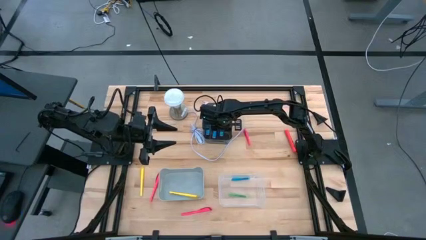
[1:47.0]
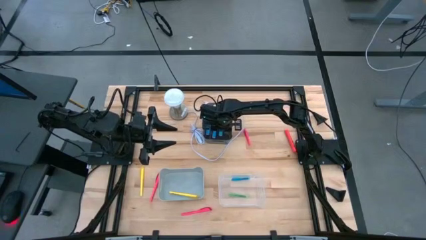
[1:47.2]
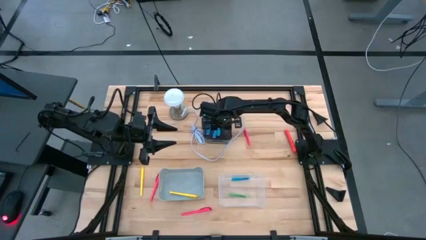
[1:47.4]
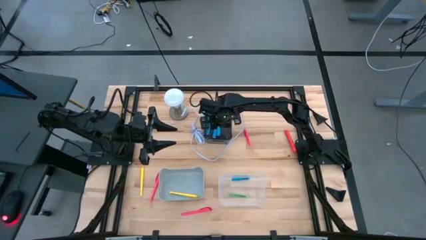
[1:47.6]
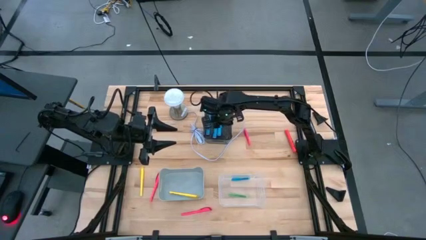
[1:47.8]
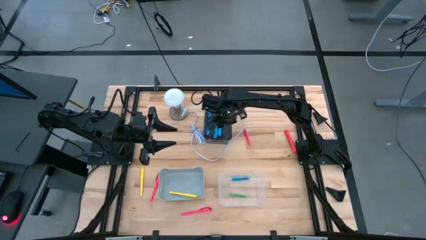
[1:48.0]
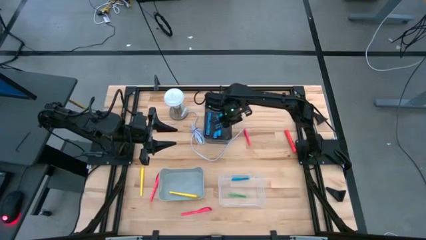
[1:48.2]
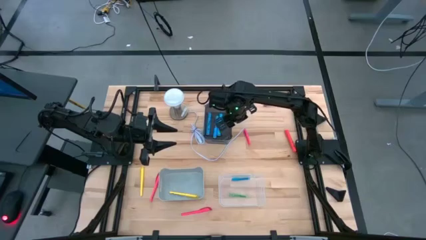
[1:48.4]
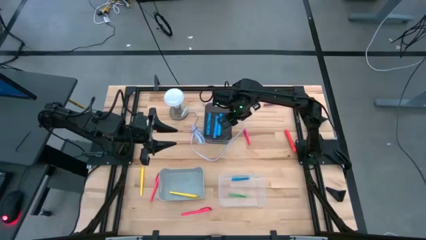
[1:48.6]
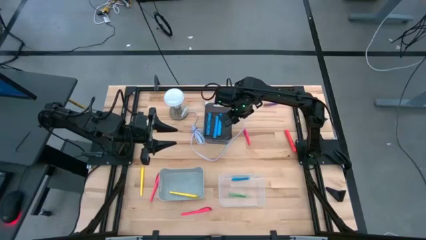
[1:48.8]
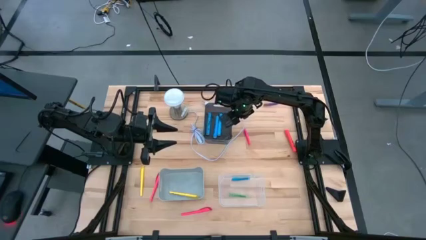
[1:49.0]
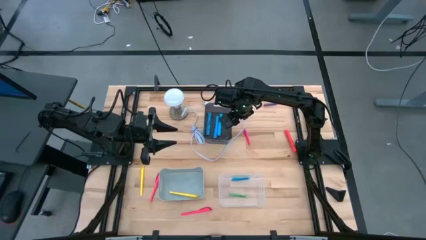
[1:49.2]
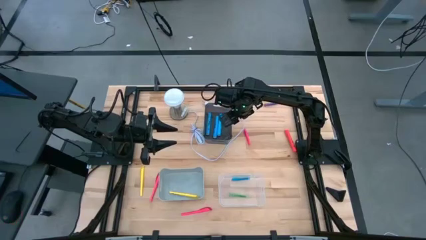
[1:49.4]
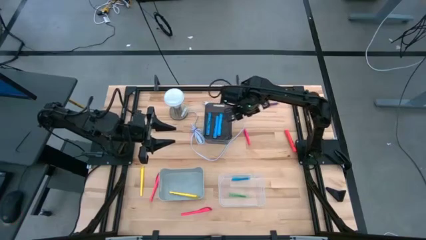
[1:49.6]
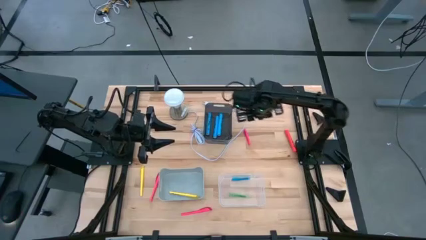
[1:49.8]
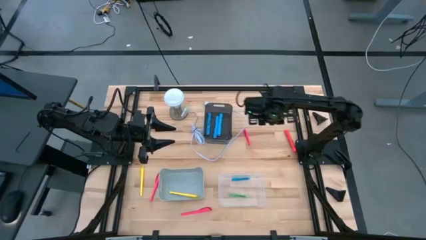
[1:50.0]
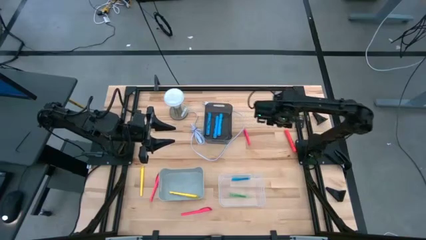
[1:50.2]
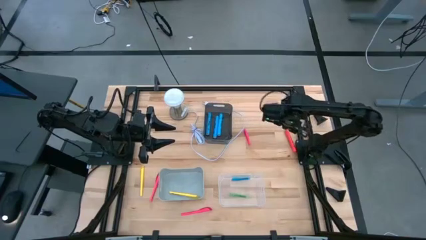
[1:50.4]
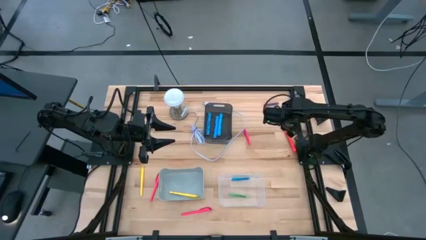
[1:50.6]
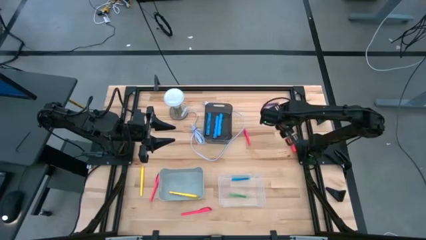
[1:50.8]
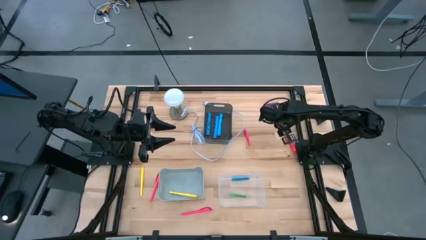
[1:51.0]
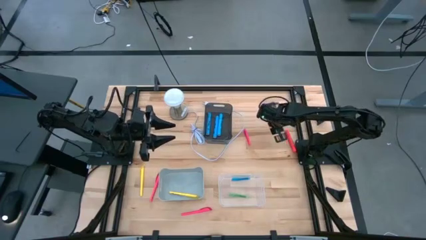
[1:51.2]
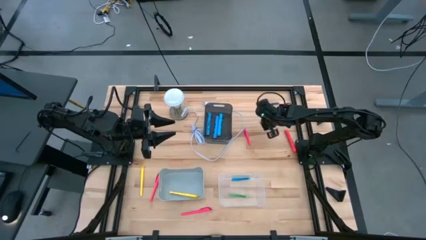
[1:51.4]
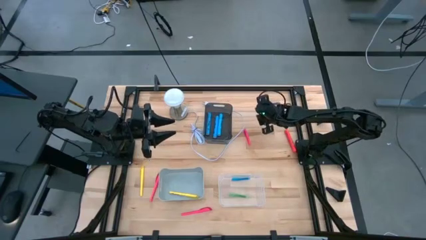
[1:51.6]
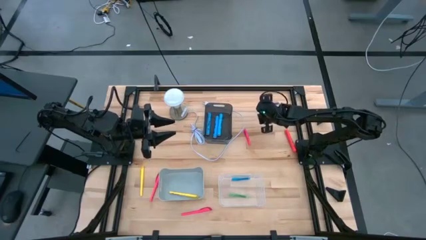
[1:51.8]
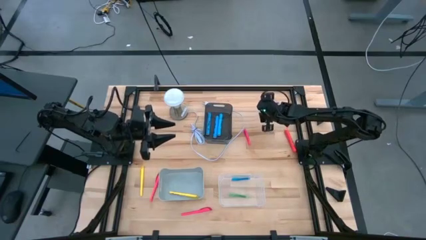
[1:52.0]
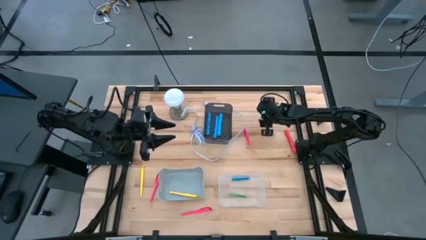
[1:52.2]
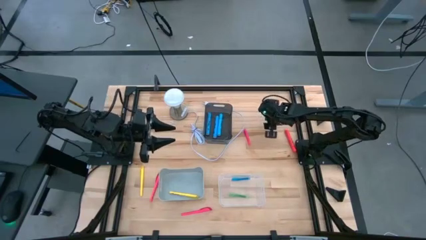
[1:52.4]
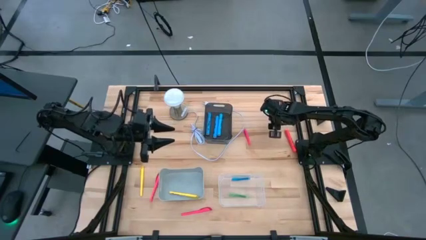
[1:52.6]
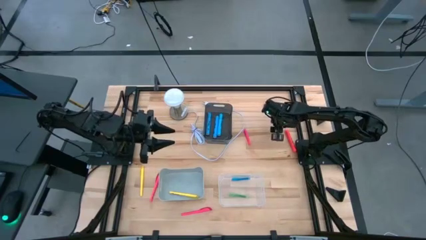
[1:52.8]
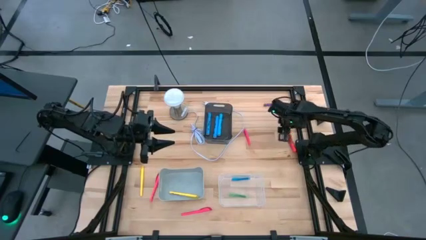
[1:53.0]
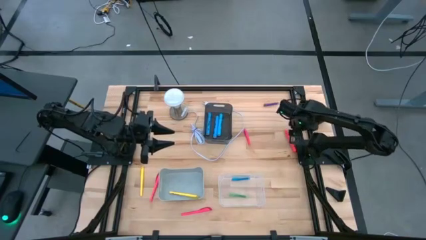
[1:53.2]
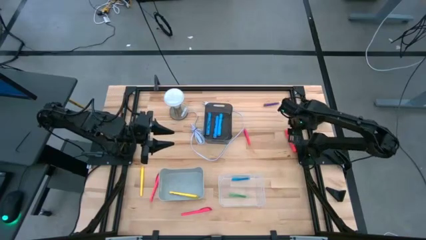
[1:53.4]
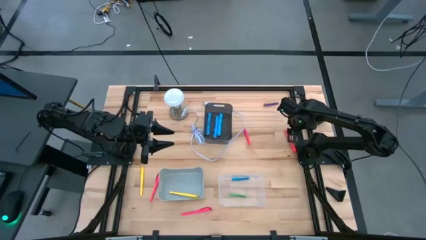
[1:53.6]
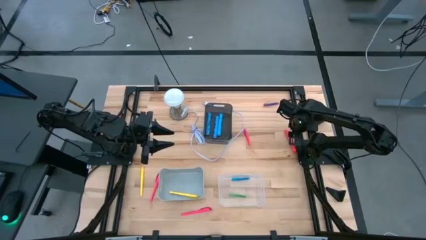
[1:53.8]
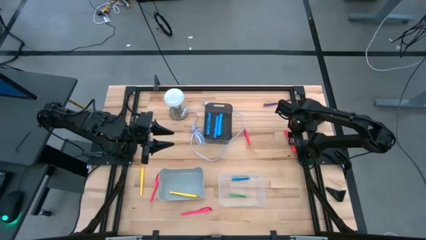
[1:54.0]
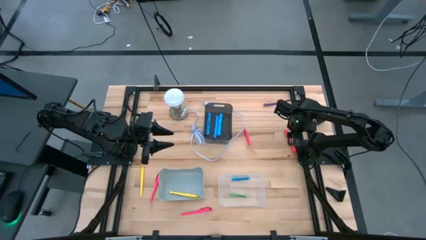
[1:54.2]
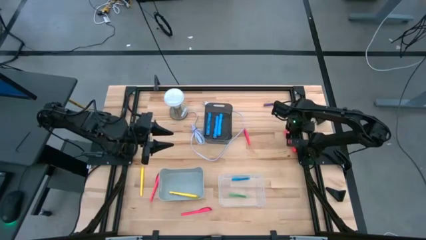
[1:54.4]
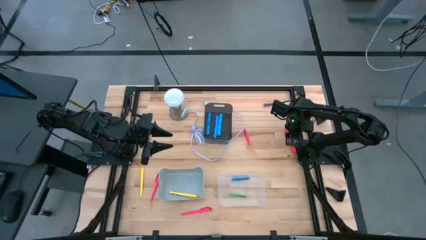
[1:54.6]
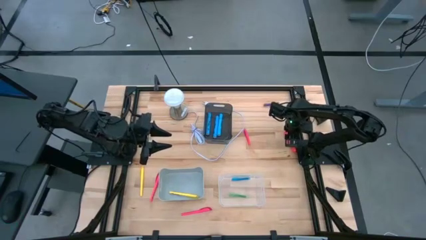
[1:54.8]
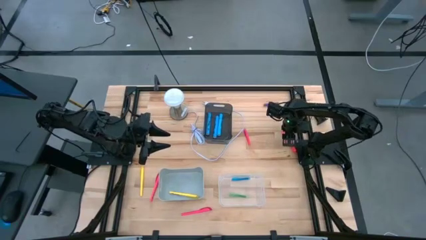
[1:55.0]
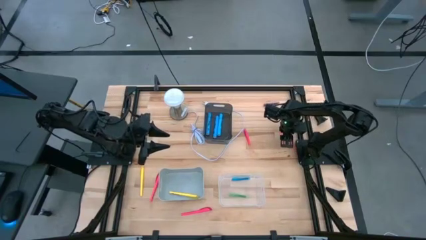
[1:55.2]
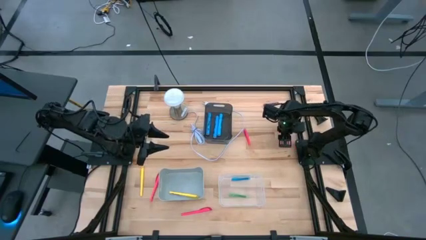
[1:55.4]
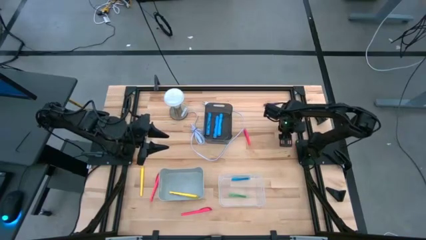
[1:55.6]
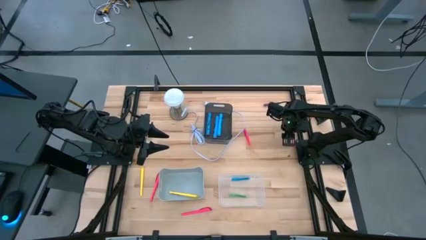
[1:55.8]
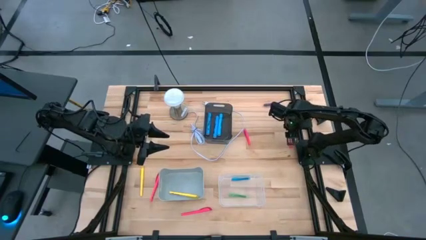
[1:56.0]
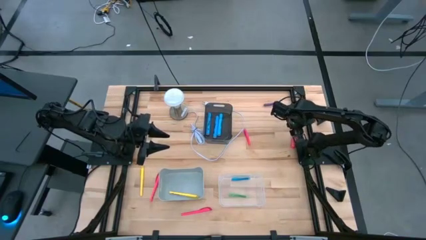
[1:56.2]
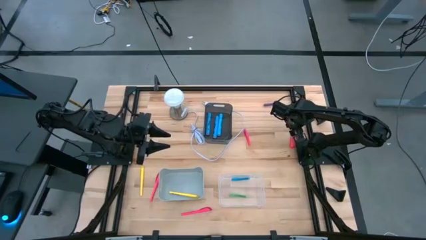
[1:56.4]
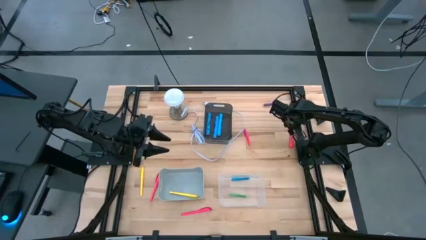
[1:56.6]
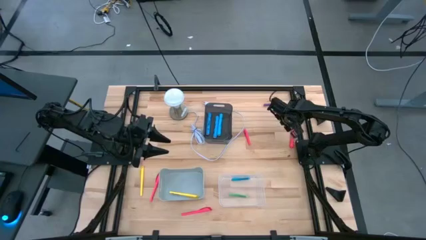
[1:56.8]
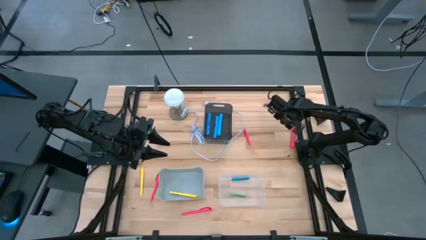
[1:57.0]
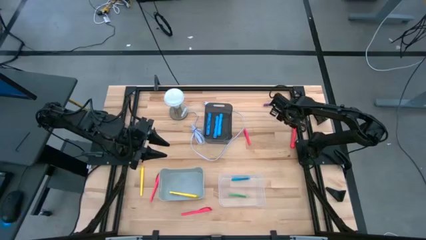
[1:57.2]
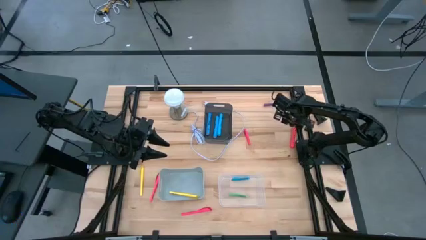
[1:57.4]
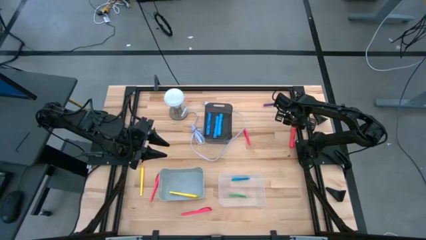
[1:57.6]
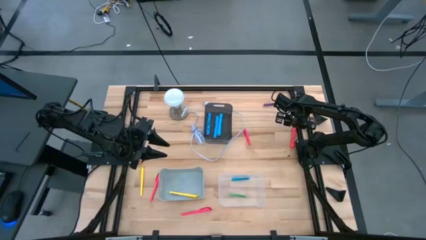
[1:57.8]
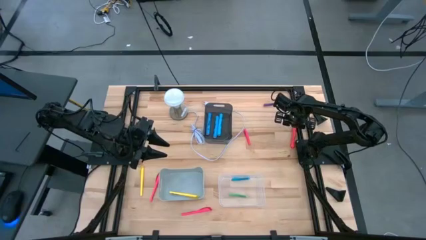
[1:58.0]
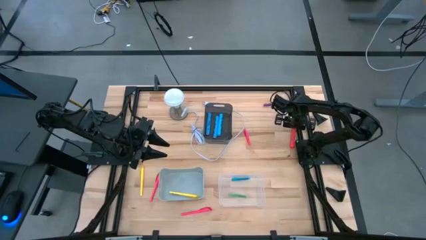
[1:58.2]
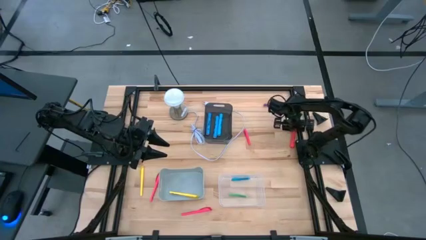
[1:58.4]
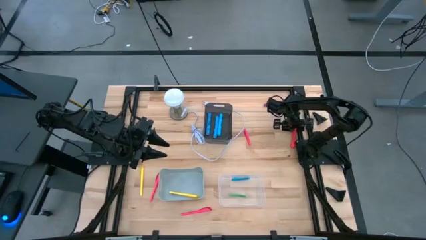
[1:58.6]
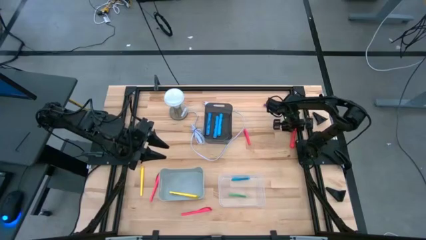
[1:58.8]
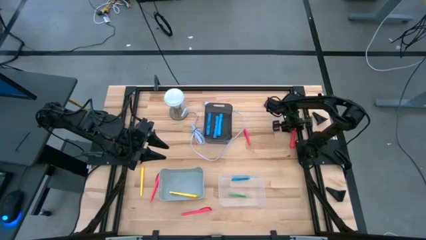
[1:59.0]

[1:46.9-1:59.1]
Task: Pick & Place Markers
Put the orange highlighter pen into the black bin

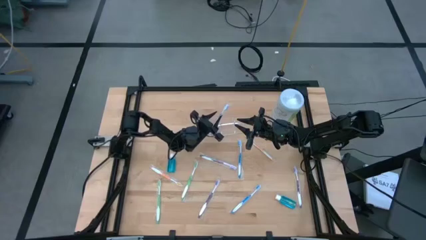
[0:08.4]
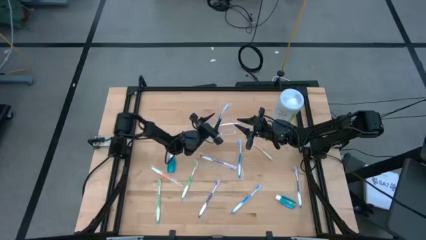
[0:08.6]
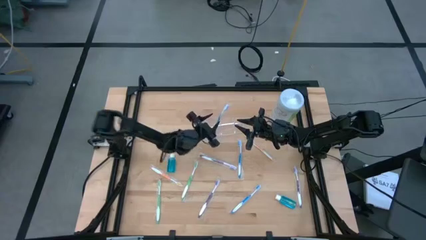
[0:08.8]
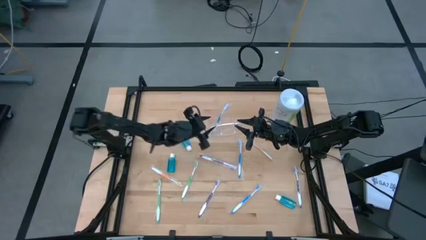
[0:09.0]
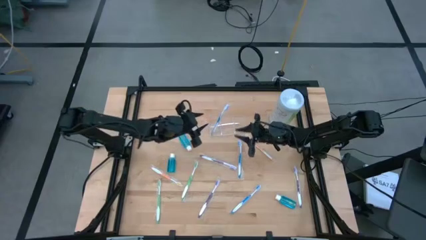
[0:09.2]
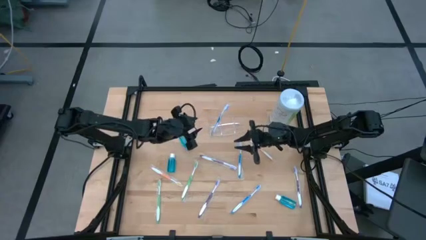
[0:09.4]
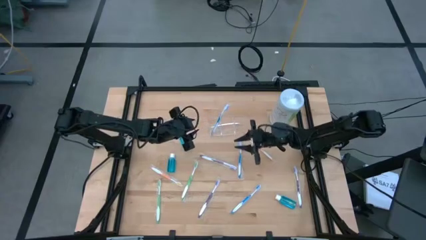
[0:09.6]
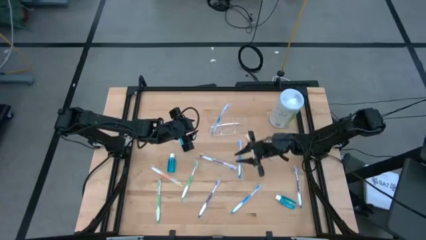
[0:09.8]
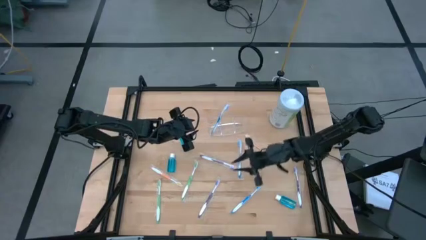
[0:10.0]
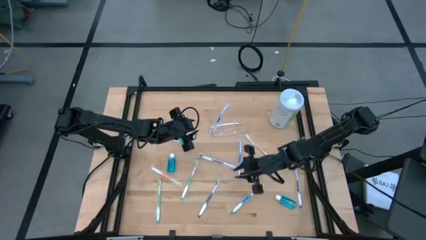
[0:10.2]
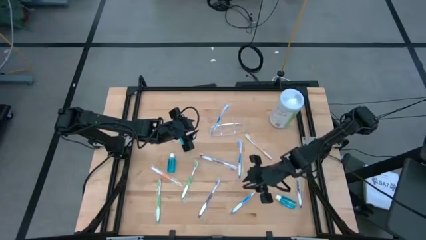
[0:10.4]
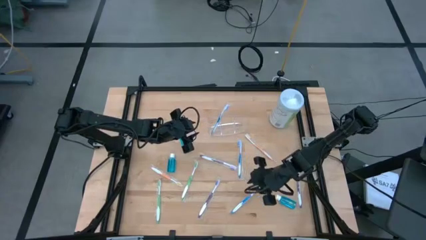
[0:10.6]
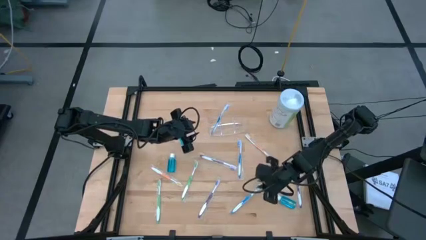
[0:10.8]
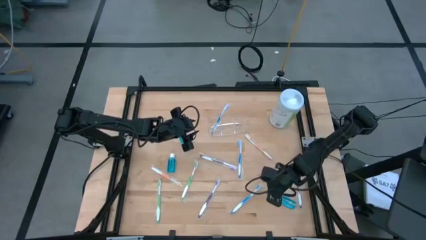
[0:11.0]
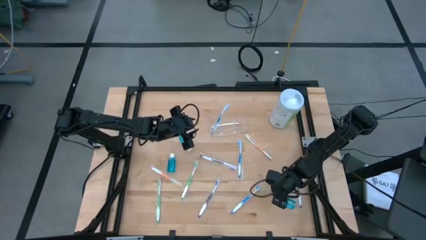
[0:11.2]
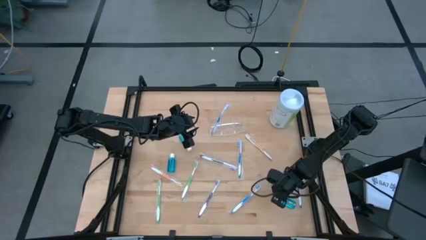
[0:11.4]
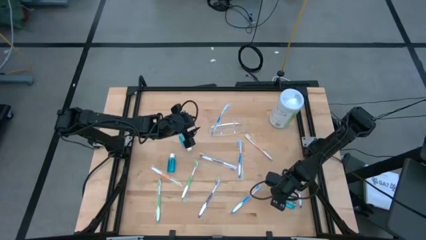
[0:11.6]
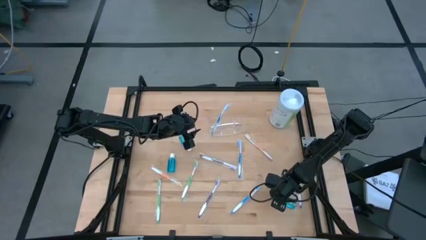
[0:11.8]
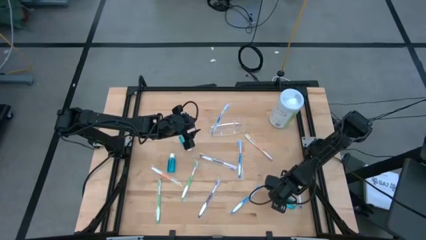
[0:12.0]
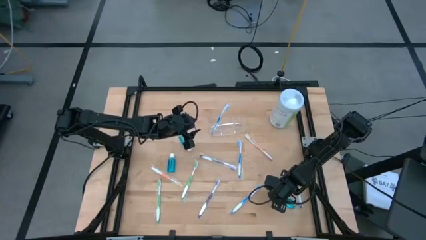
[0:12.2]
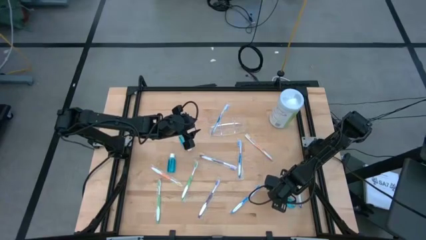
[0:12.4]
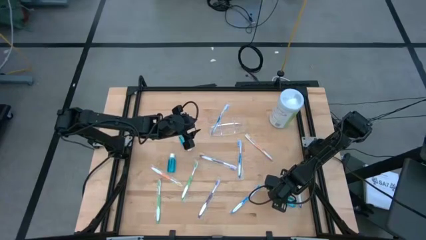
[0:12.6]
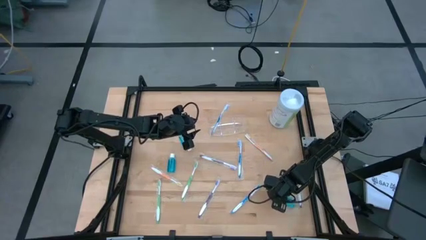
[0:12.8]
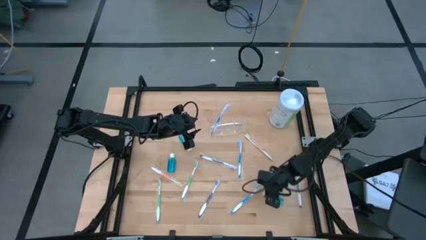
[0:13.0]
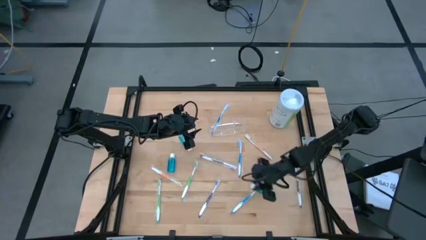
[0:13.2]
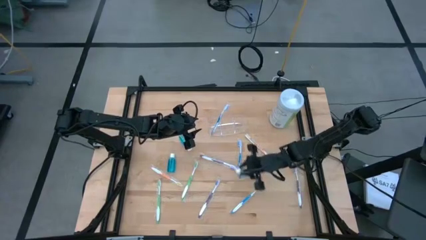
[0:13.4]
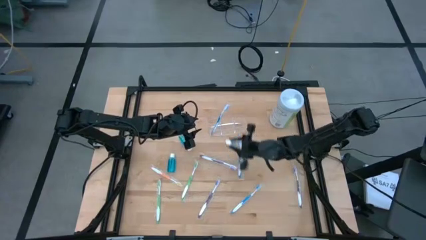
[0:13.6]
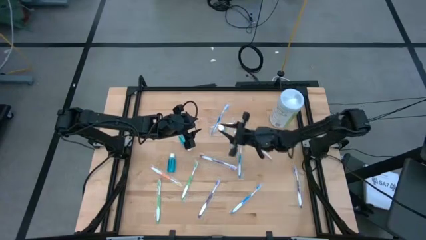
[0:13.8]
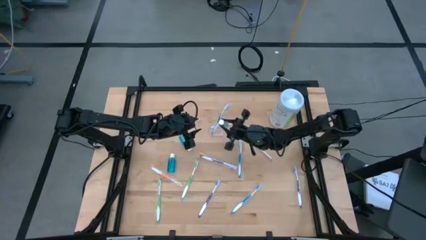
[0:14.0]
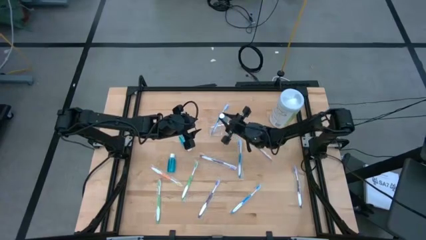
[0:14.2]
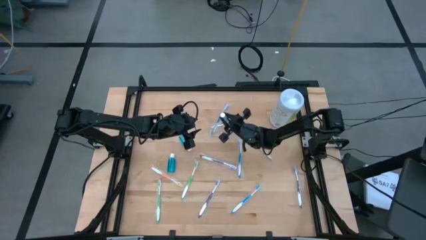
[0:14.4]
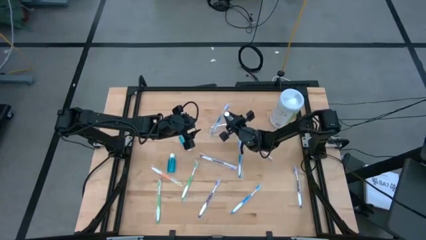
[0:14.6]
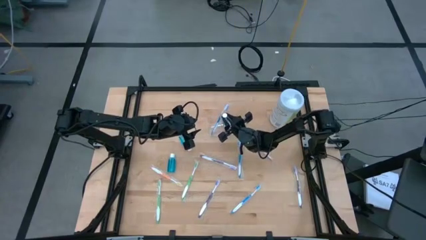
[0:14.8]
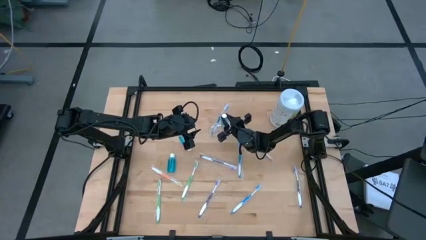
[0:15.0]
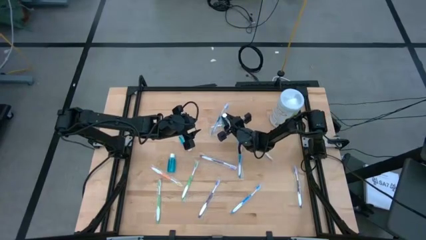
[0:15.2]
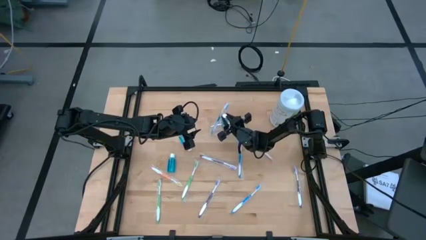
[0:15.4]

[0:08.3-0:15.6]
Task: Pick & Place toothbrushing station
Put the bottom blue mouthwash into the transparent organizer
